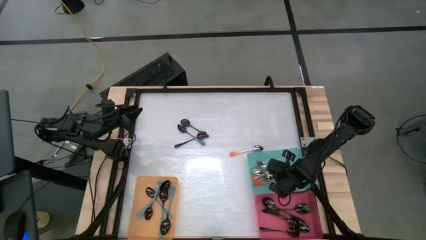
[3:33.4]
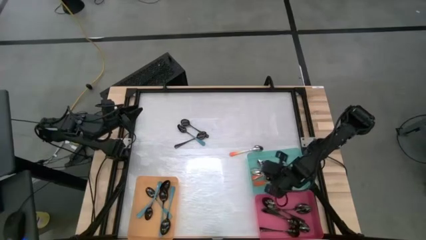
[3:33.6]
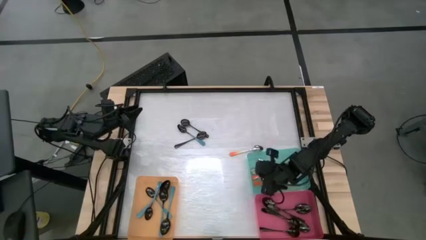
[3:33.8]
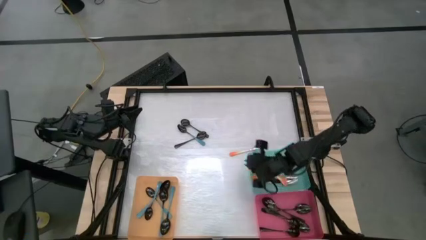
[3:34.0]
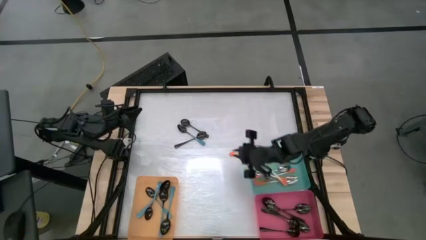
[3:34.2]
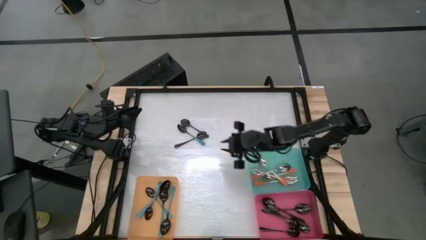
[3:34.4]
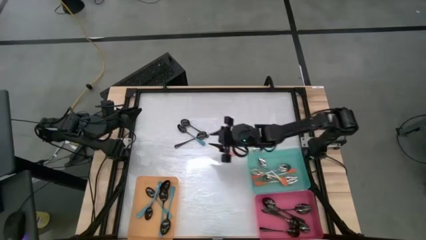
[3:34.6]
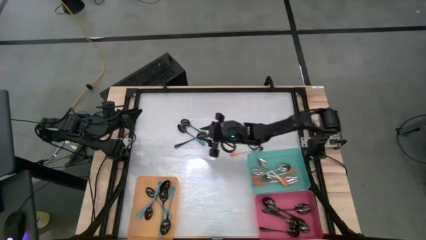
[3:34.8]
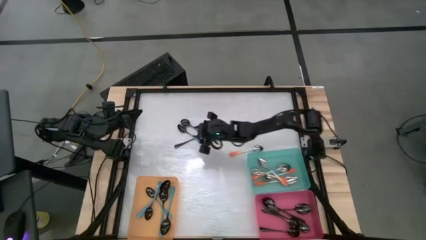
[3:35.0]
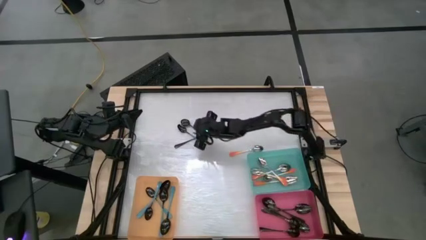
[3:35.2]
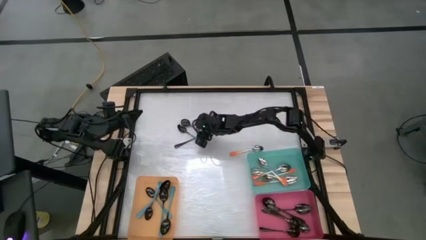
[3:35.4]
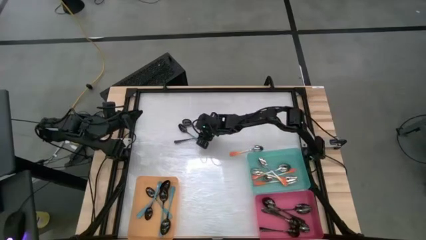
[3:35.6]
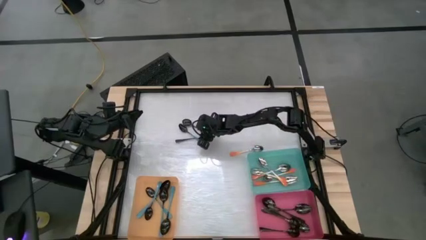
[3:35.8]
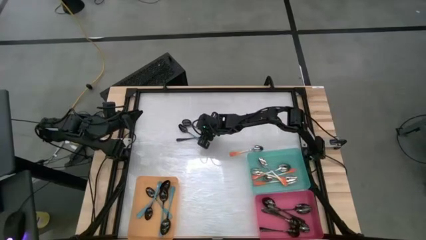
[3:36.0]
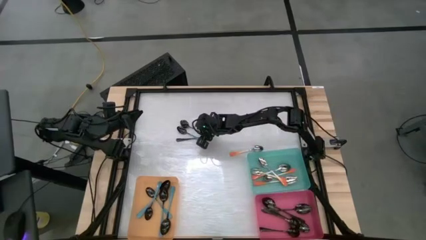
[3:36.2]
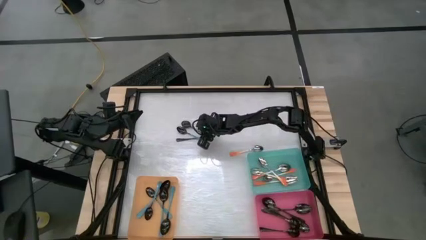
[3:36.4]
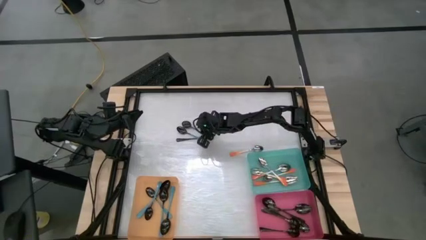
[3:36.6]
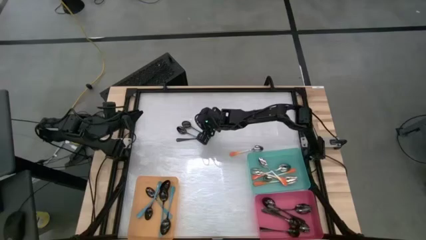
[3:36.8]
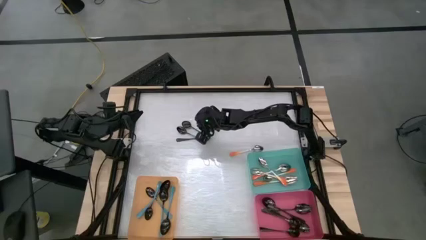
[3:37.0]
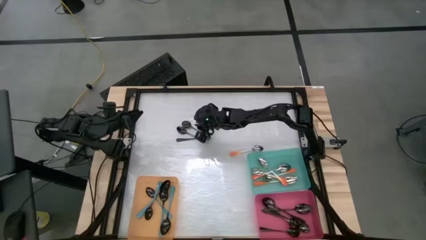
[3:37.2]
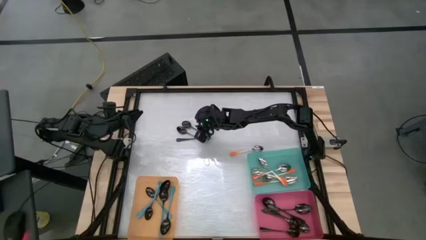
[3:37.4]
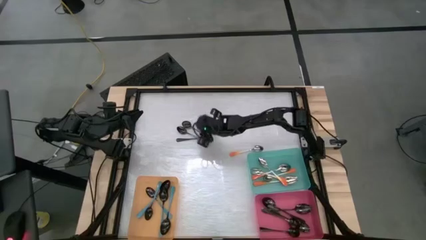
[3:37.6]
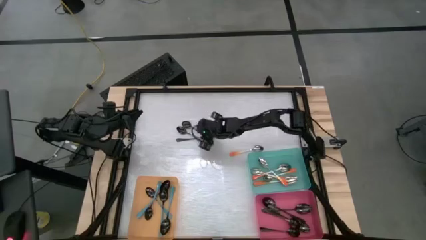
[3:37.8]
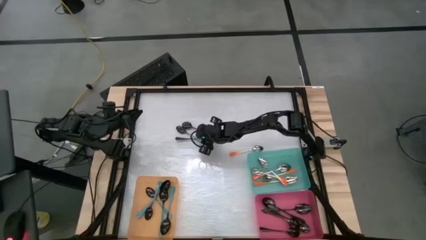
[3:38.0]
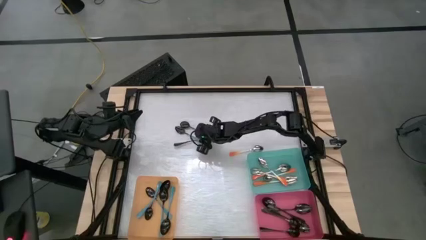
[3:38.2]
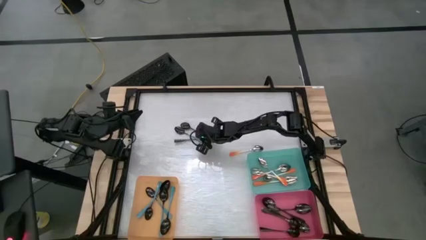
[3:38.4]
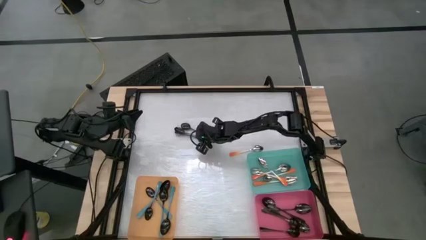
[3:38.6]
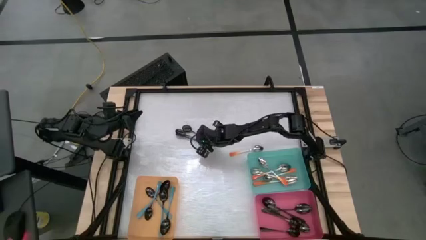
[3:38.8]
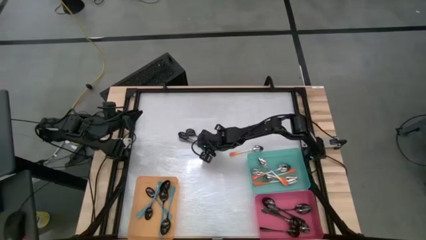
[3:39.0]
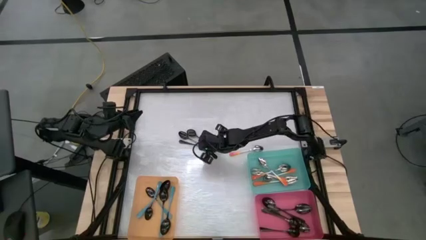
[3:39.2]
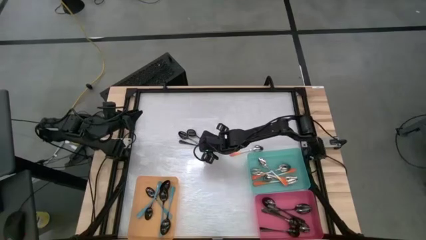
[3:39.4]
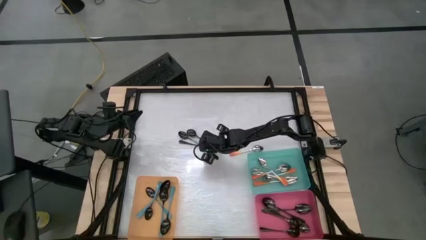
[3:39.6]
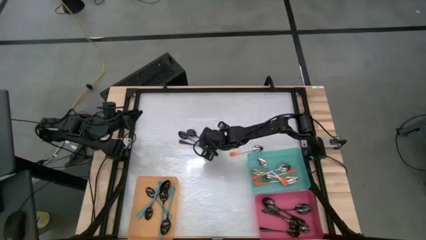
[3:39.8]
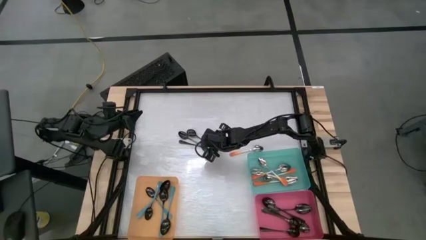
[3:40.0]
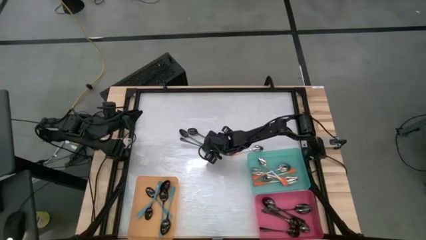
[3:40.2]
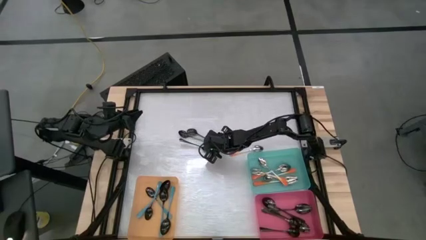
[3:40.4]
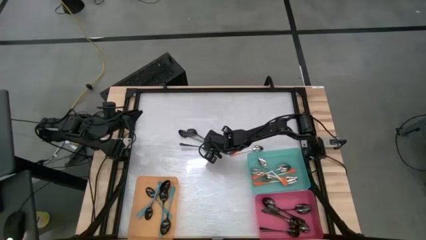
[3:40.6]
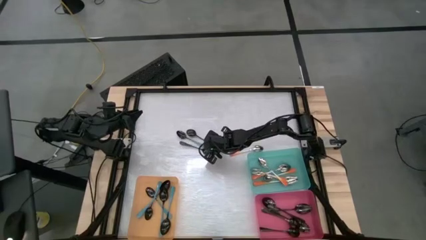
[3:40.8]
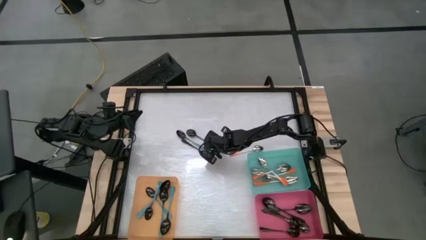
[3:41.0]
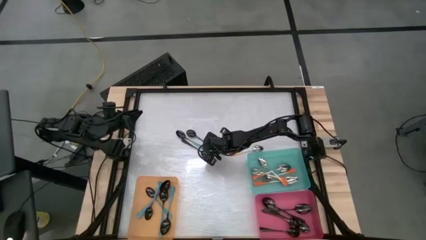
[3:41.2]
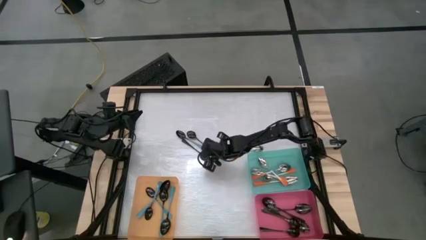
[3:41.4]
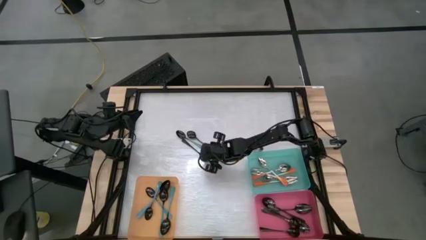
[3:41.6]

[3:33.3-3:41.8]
Task: Sort silverware by color (type)
Put the black spoon into the pink bin

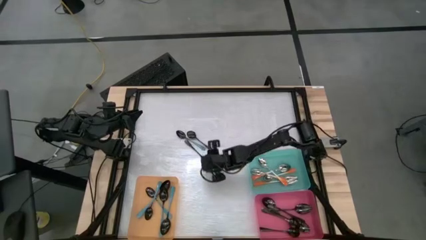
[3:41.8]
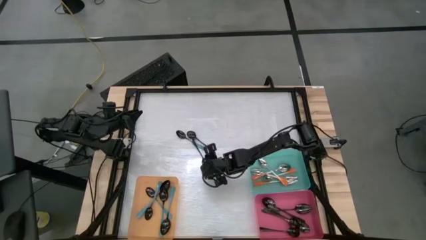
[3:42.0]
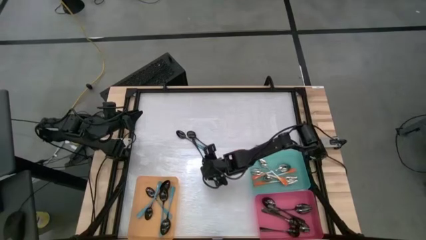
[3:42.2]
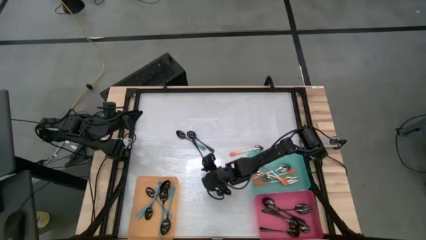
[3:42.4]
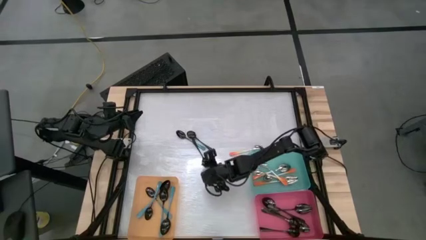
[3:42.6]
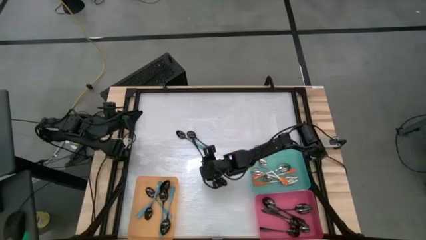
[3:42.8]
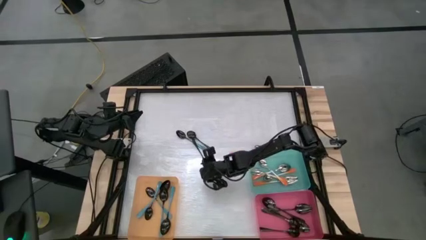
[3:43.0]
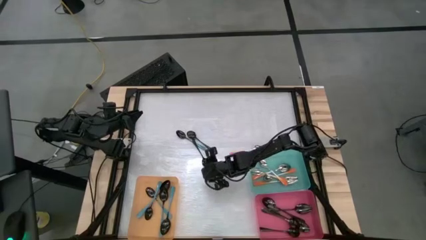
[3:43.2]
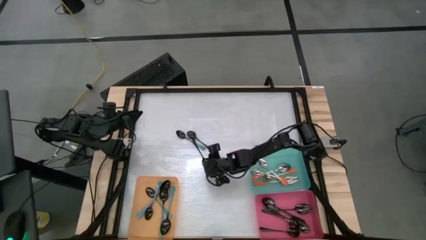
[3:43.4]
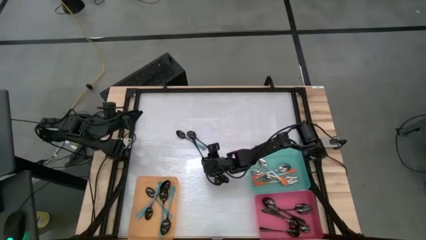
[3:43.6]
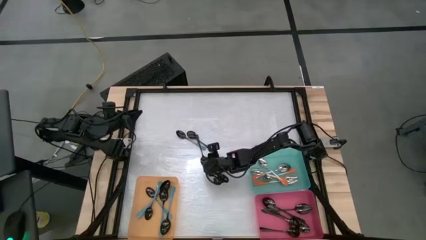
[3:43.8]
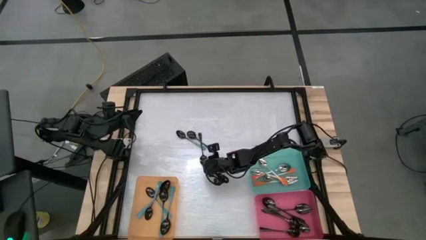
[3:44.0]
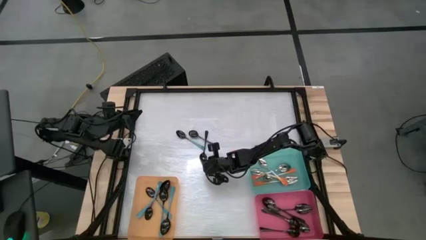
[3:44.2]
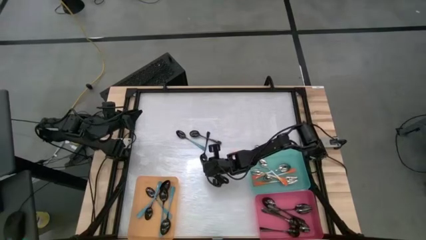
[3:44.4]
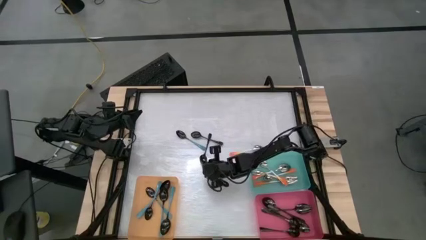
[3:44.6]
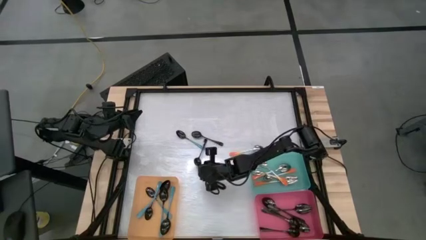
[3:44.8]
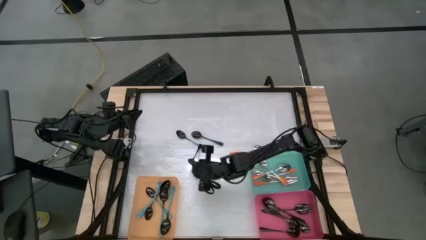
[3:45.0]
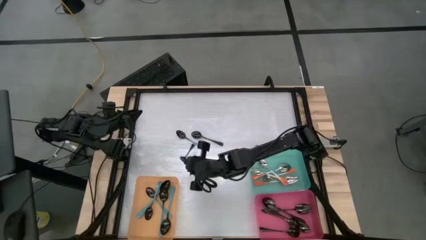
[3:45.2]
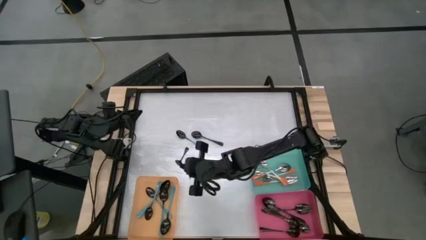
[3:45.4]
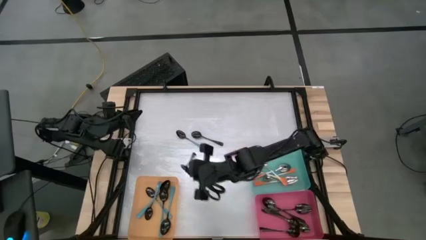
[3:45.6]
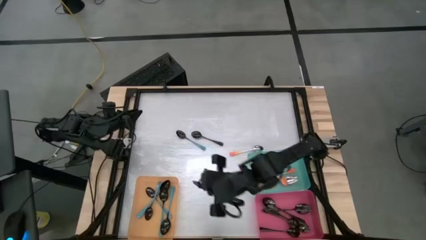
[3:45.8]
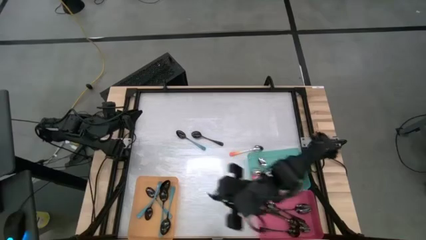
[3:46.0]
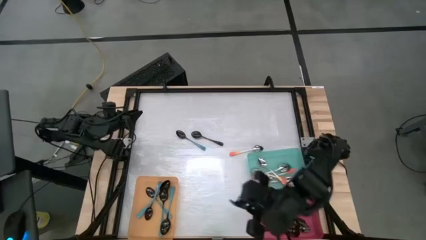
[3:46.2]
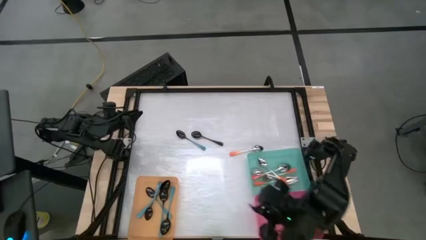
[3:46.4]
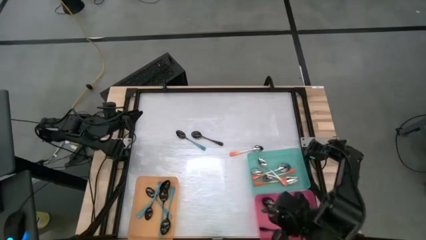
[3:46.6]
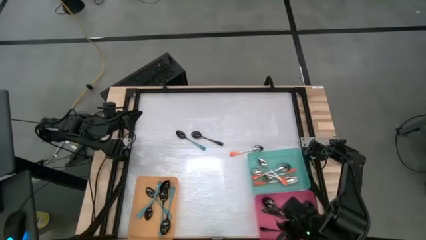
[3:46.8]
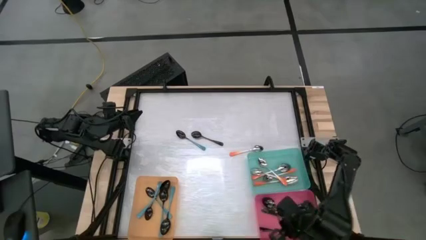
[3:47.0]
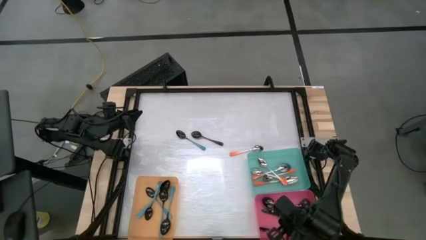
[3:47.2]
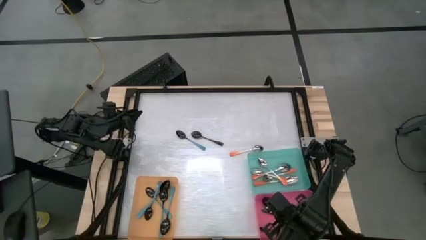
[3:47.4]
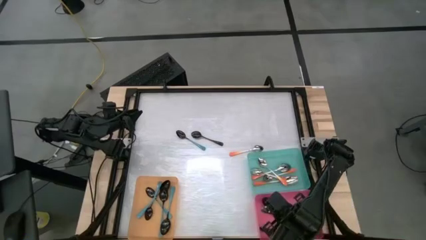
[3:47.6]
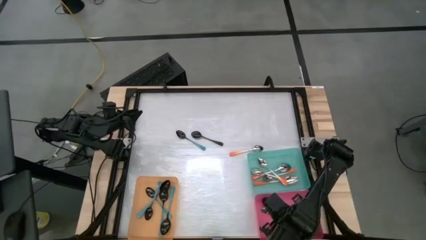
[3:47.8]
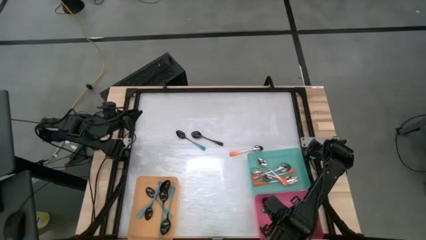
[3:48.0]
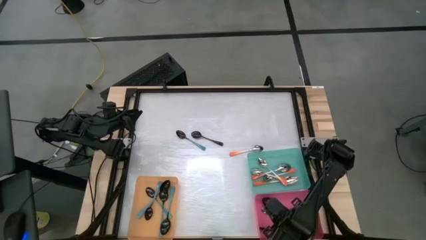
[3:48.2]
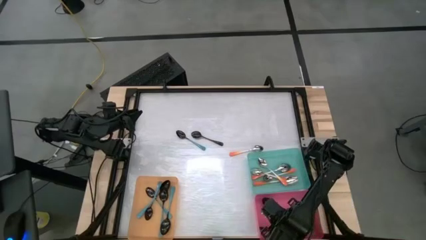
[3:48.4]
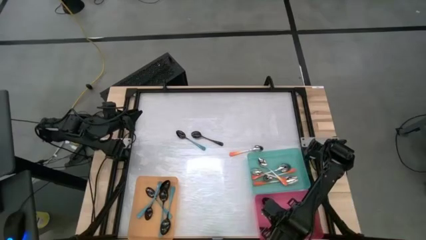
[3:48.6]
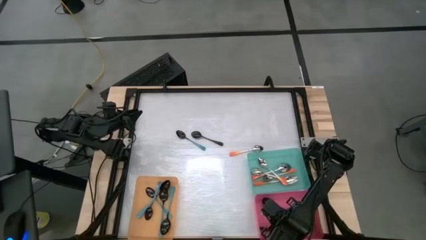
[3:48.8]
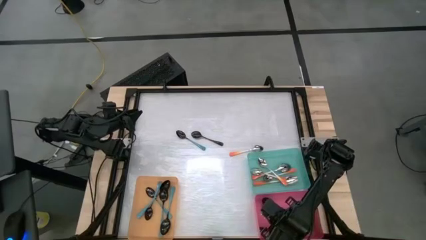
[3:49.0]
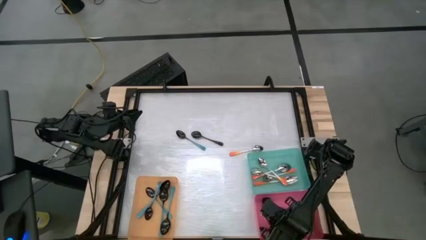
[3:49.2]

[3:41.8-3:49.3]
Put the black spoon into the pink bin

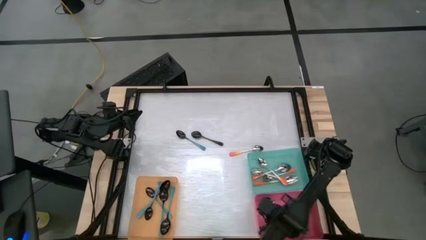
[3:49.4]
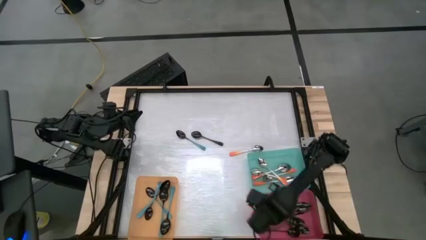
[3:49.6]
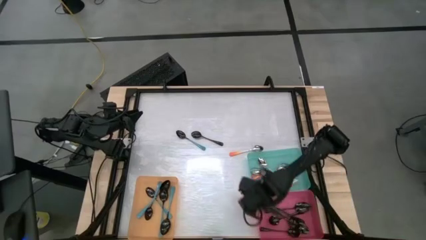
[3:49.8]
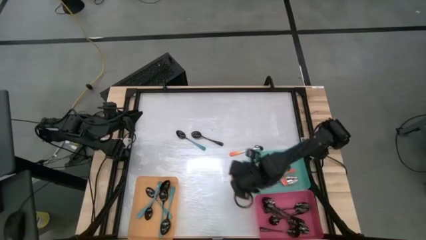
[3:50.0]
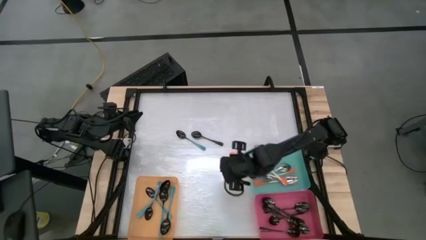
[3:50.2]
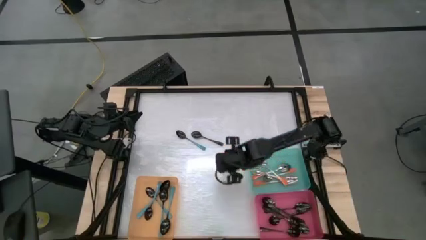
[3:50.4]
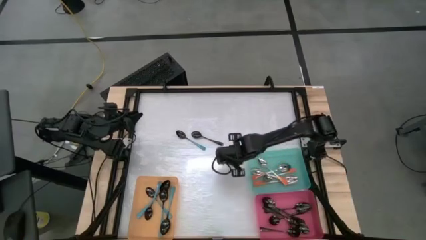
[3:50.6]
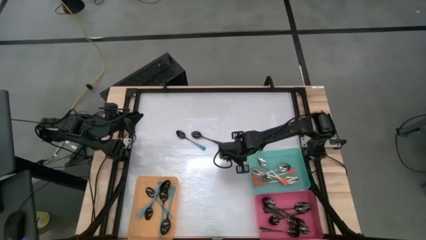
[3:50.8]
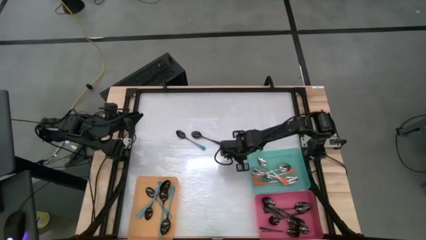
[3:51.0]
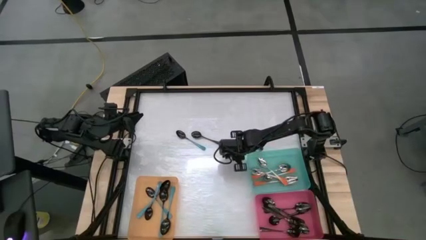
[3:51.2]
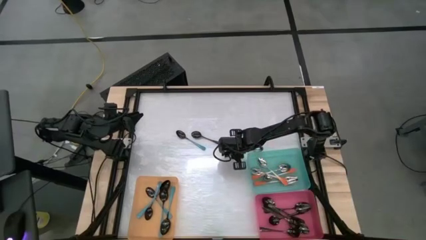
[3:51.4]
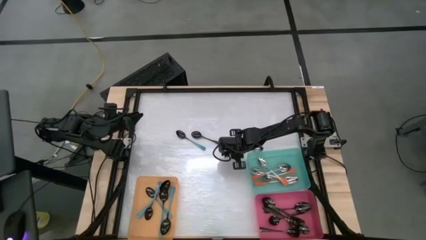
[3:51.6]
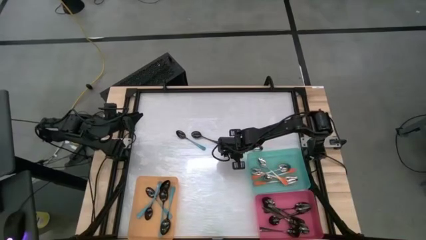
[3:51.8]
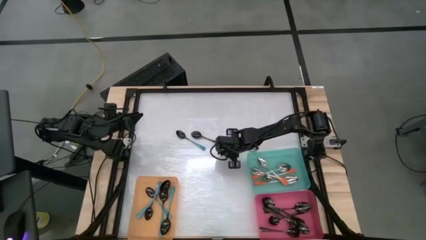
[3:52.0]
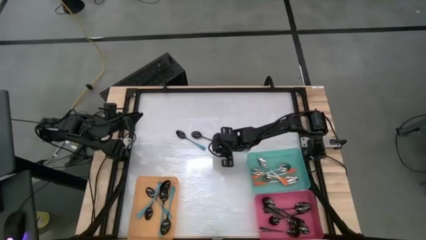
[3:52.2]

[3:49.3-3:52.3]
Adjust the orange spoon on the table
